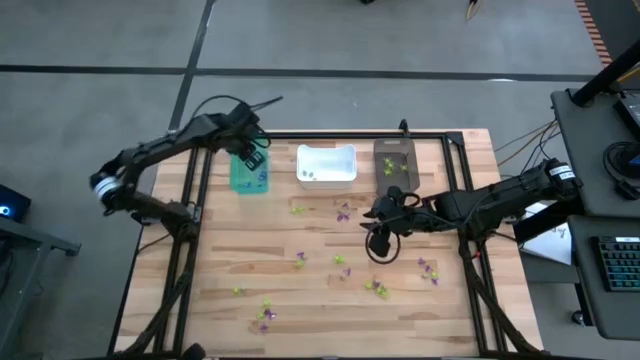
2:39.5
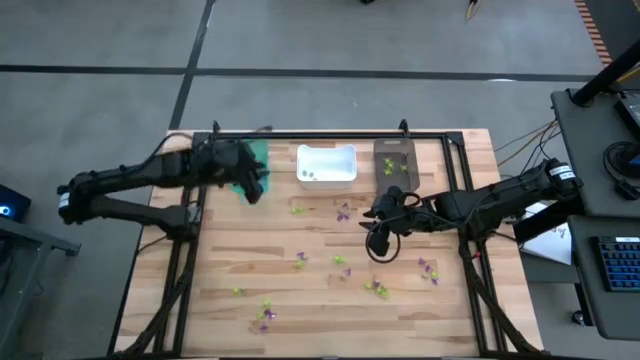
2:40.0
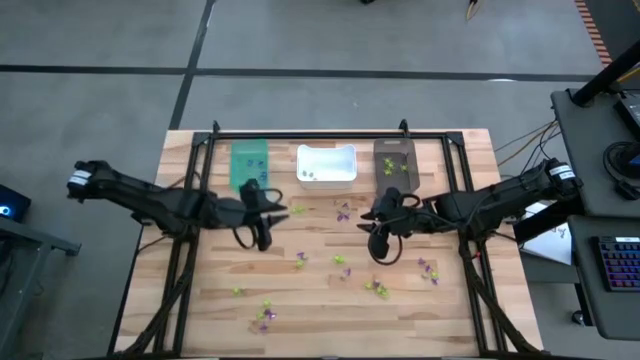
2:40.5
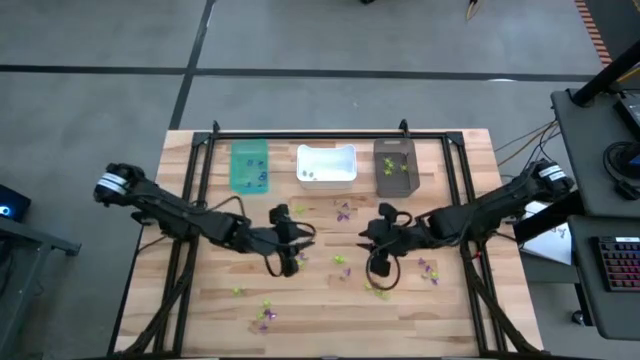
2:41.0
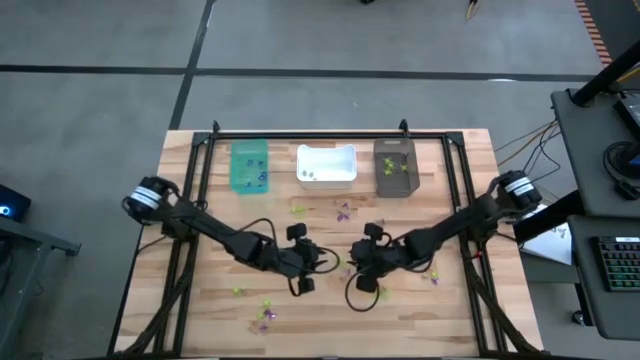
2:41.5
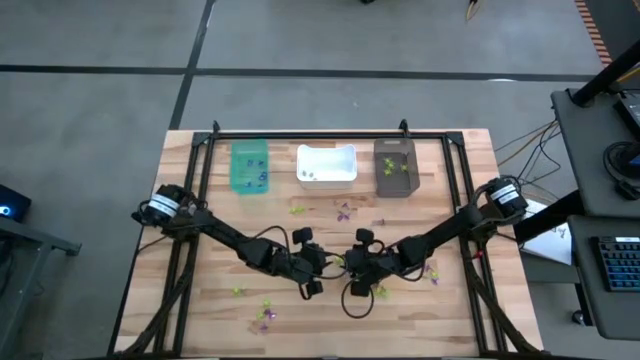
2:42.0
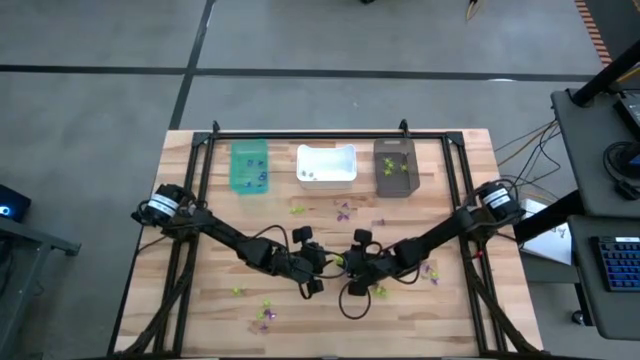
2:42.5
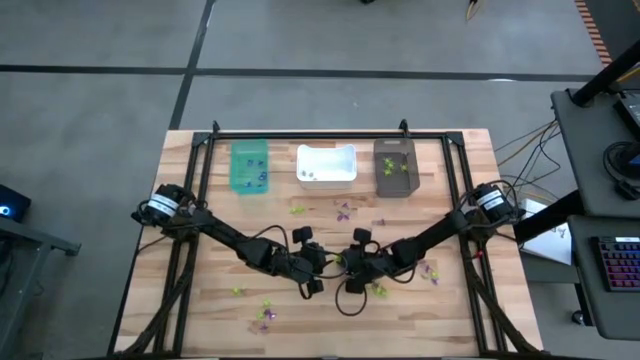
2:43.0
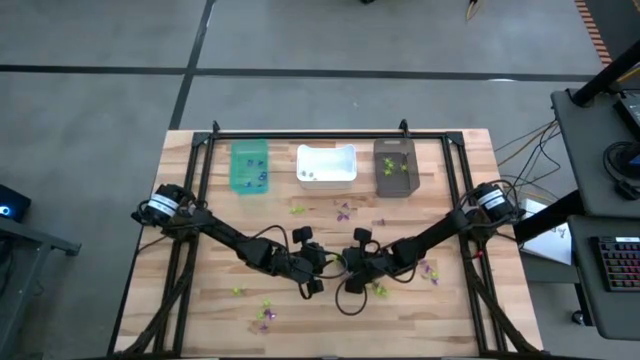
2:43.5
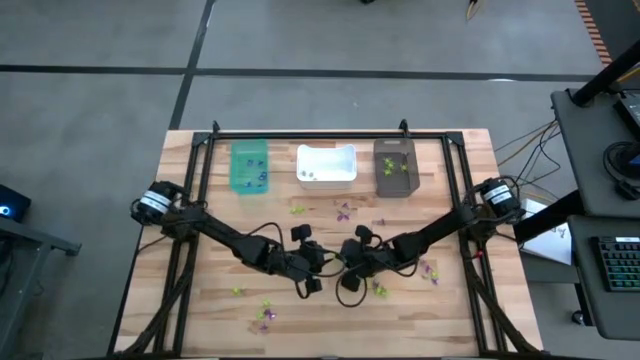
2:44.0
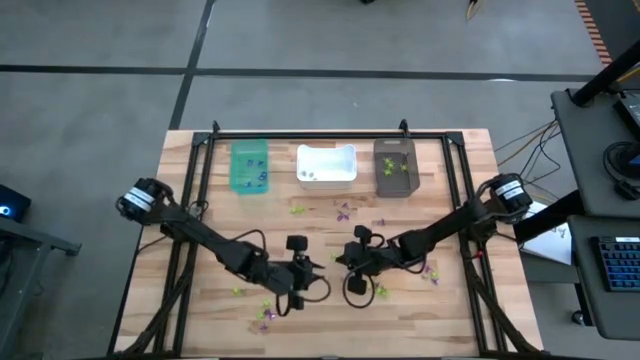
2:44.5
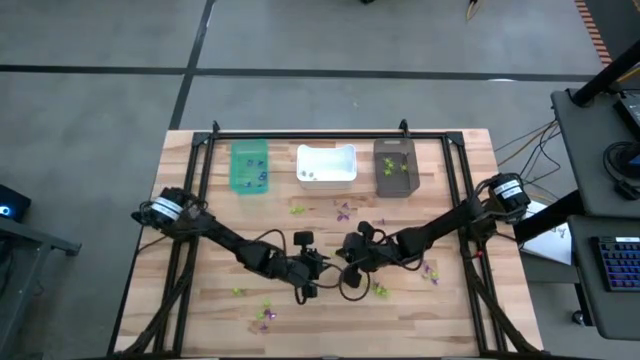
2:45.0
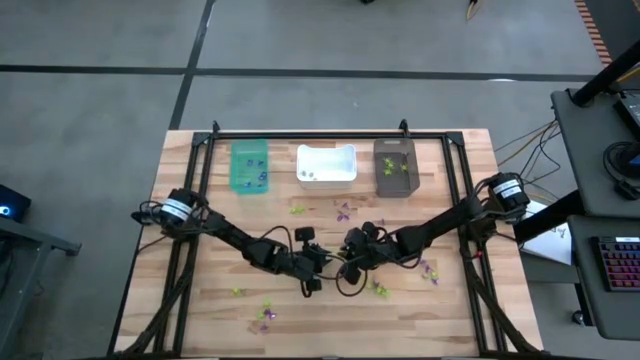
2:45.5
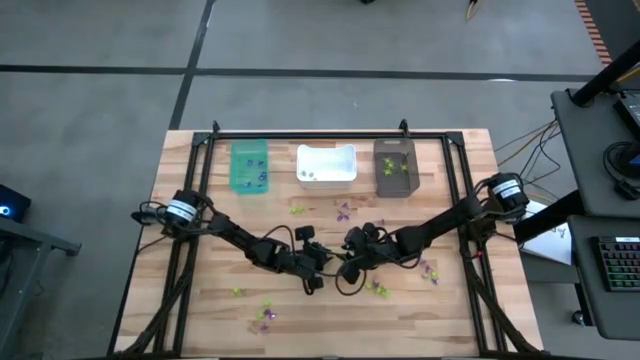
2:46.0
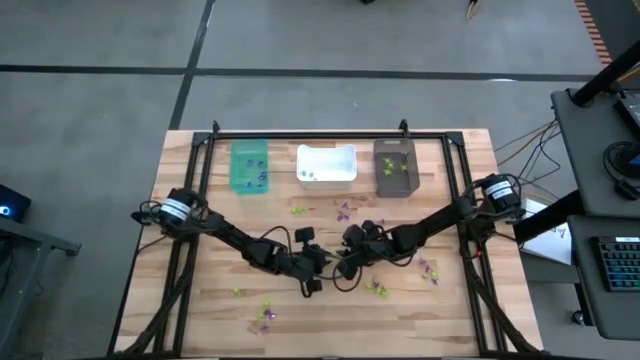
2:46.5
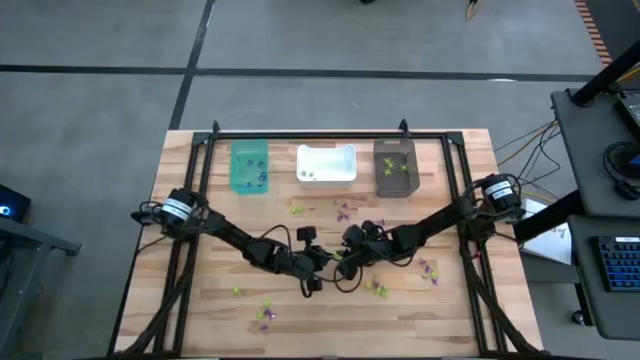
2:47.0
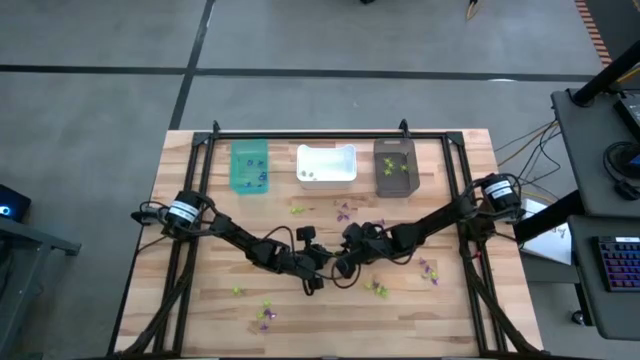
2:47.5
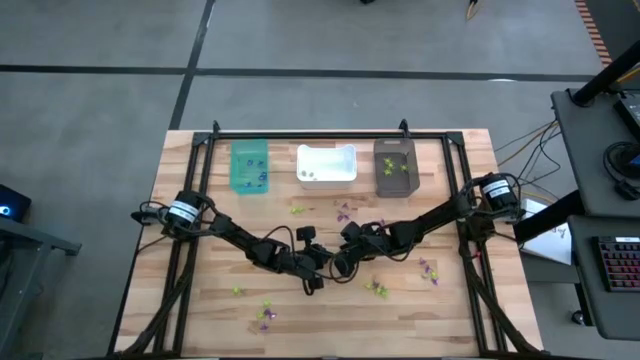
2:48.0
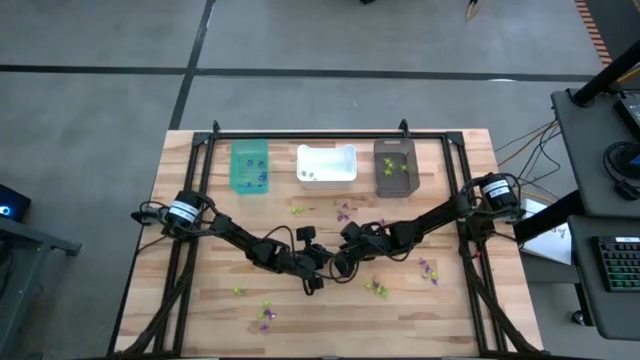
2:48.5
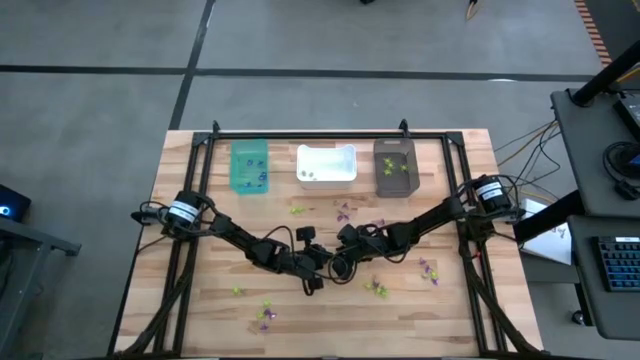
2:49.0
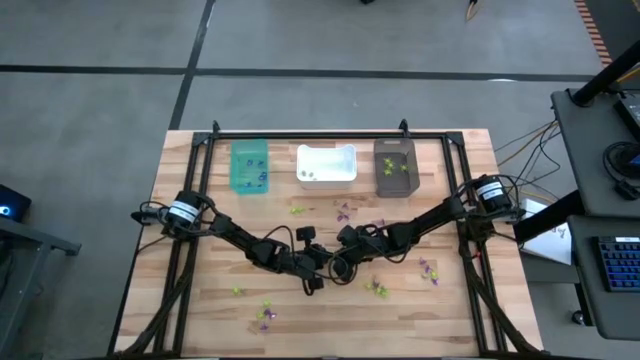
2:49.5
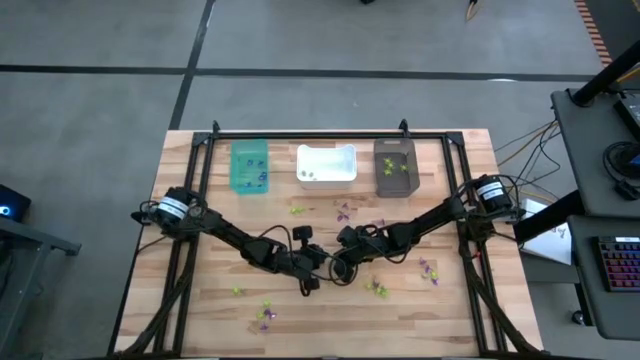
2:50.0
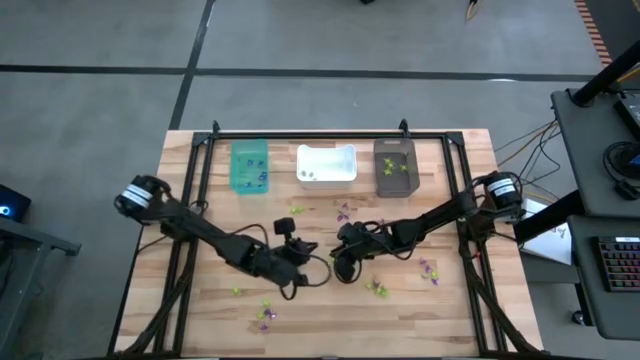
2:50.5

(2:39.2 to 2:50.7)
Task: Sort Halloween decoration
Put the green spider toy into the black bin

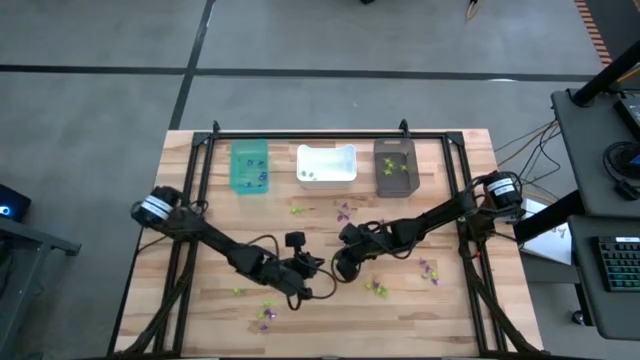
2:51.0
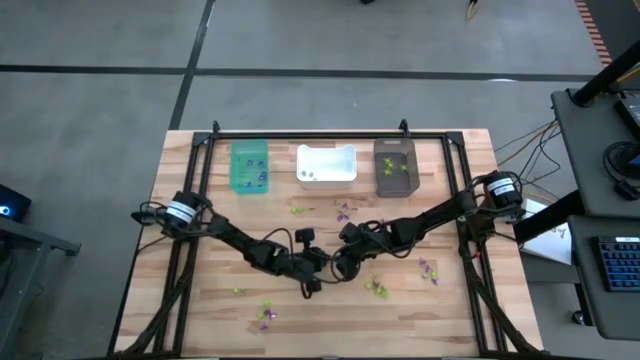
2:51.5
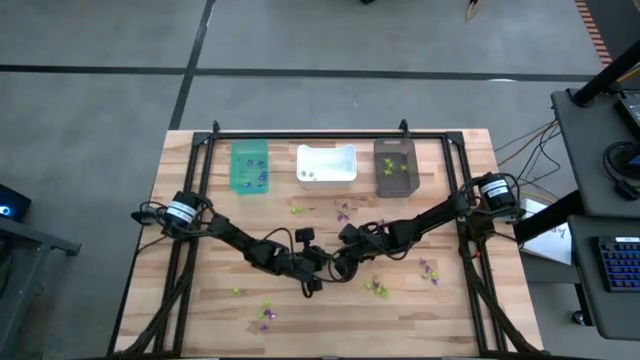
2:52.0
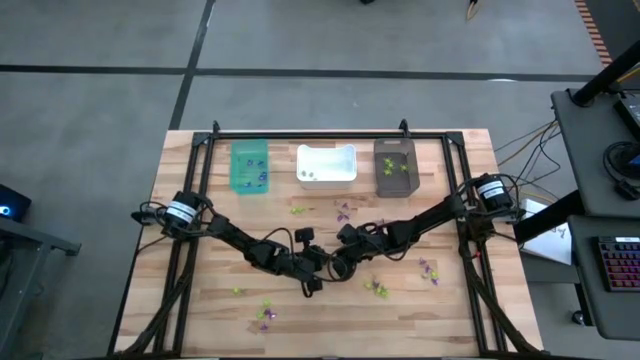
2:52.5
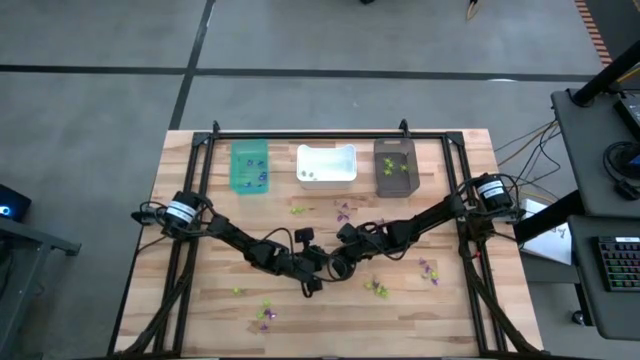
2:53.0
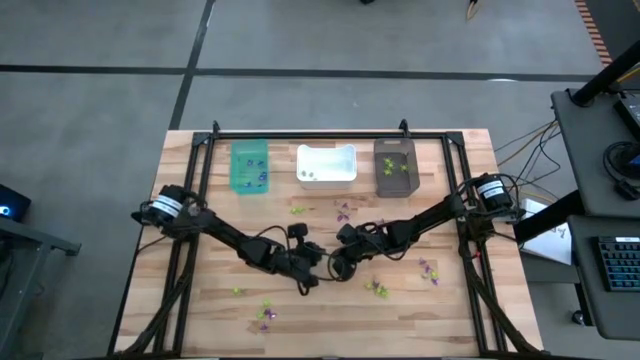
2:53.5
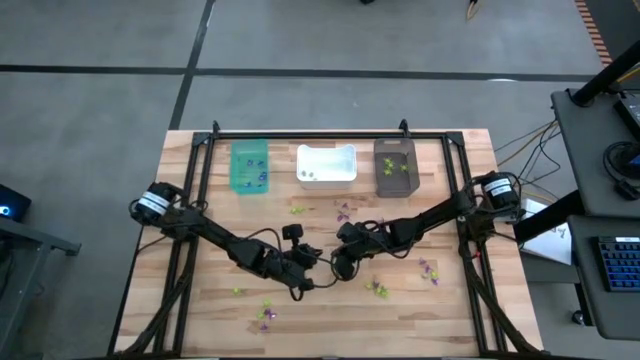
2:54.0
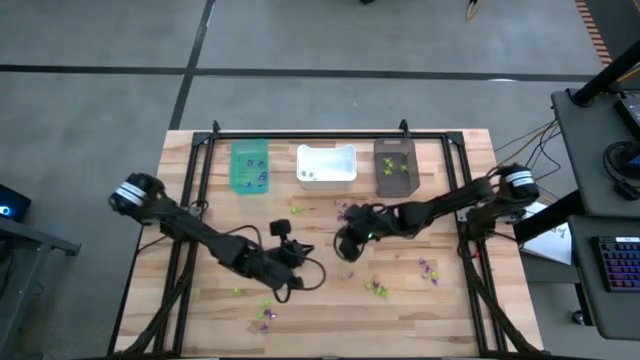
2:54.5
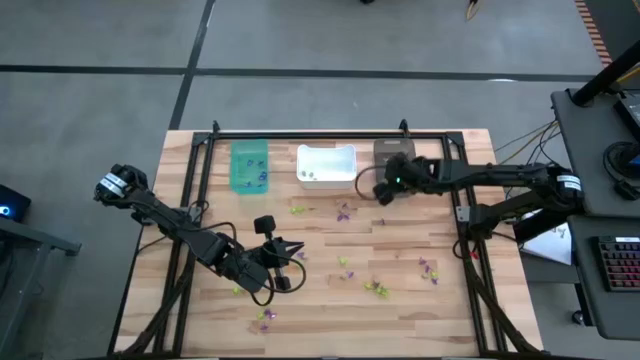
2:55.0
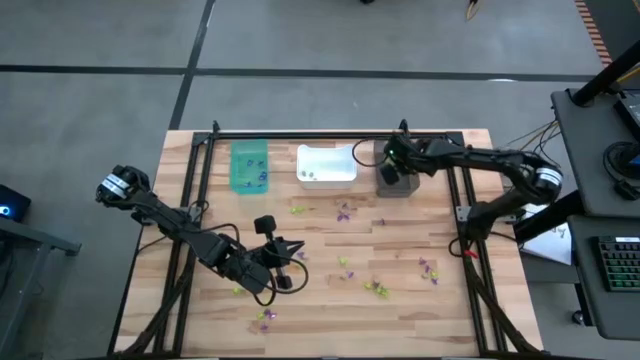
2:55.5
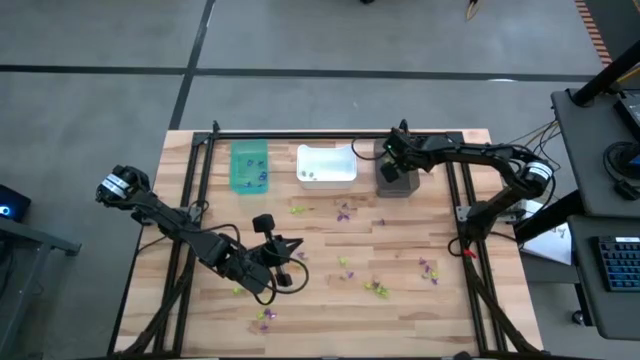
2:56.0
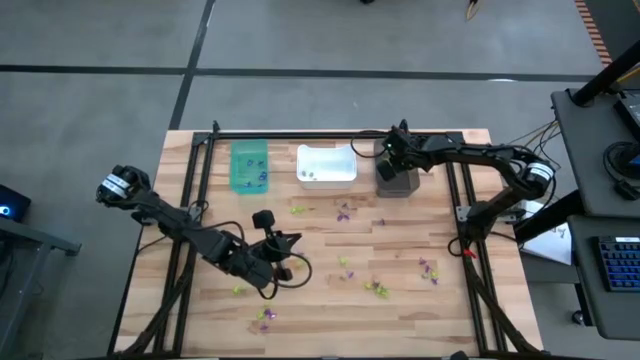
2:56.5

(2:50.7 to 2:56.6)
Put the green spider toy into the black bin

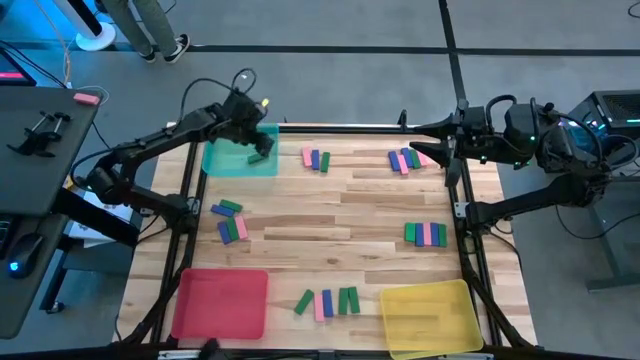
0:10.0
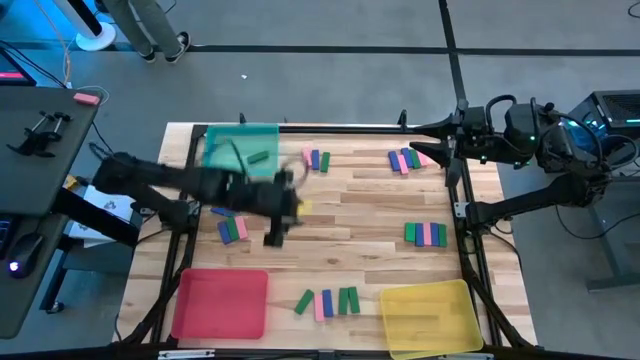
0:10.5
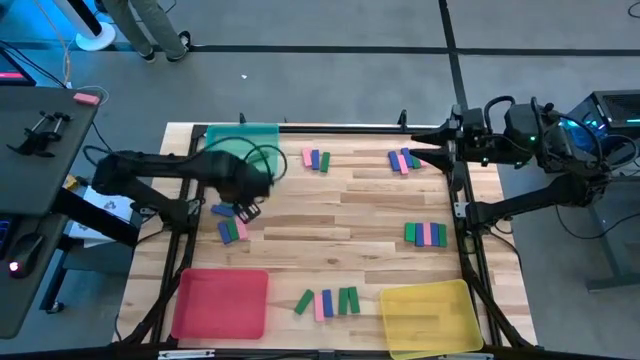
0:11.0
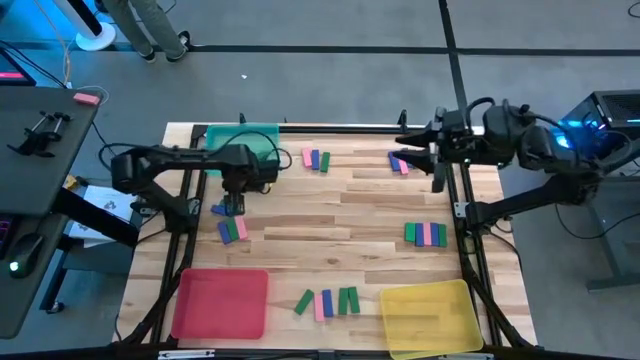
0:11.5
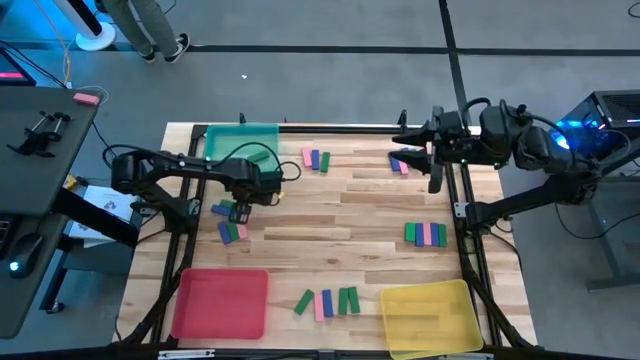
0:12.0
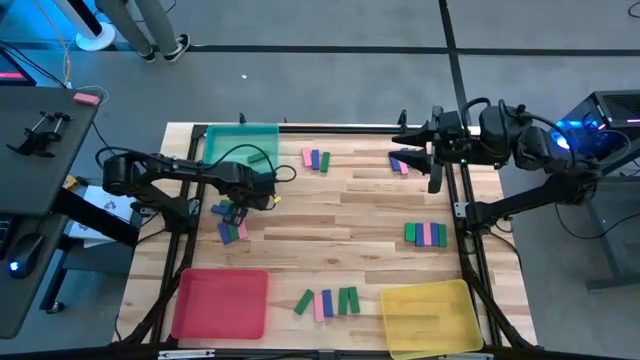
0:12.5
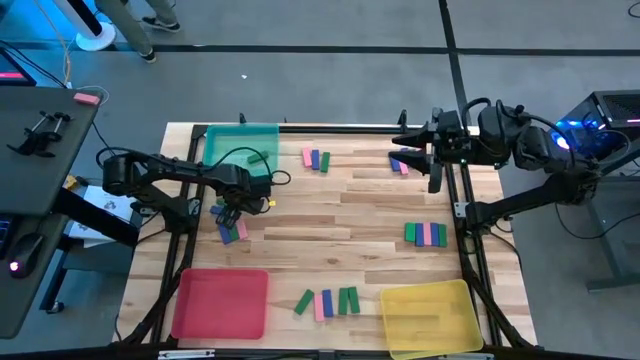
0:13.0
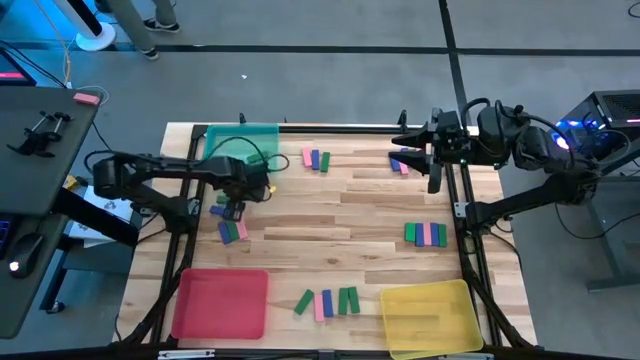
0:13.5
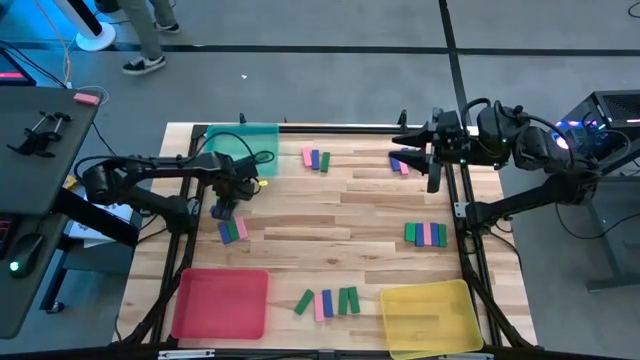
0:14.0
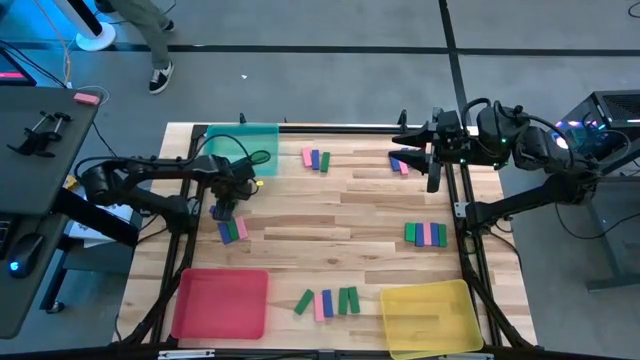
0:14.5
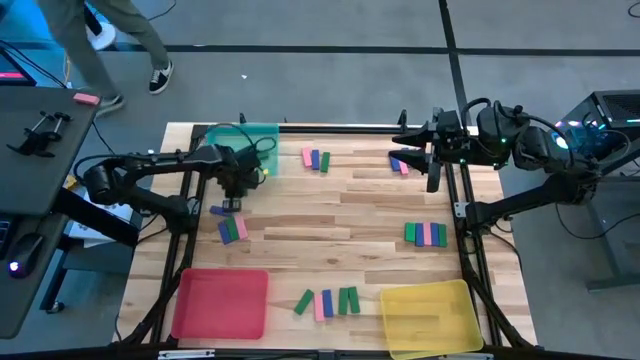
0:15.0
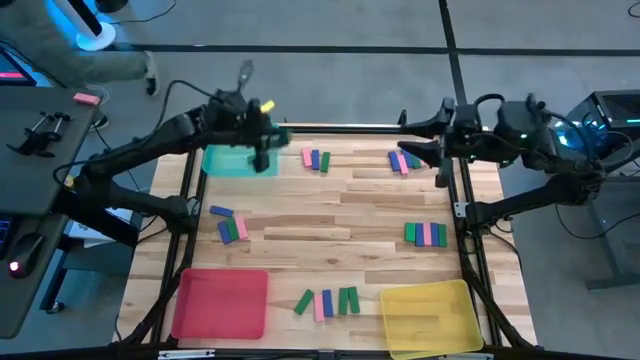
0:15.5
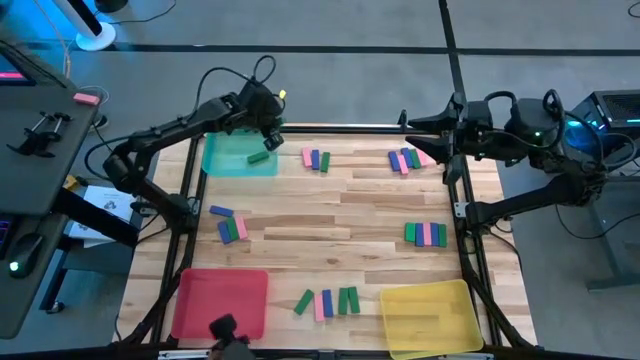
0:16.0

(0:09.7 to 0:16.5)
Task: Sort blocks
Put the green block into the blue bin
